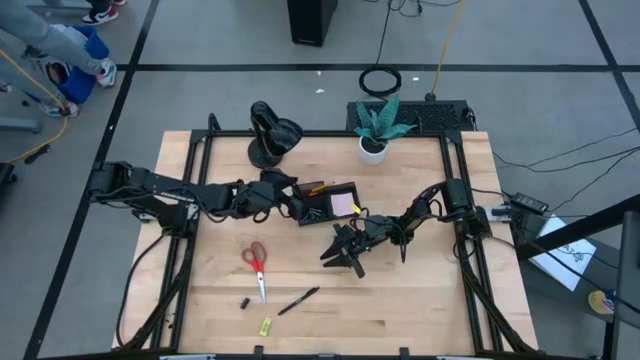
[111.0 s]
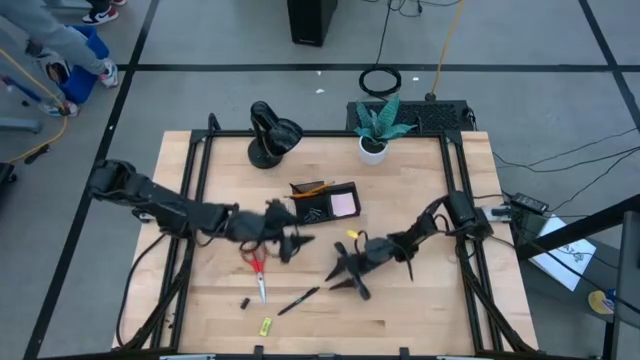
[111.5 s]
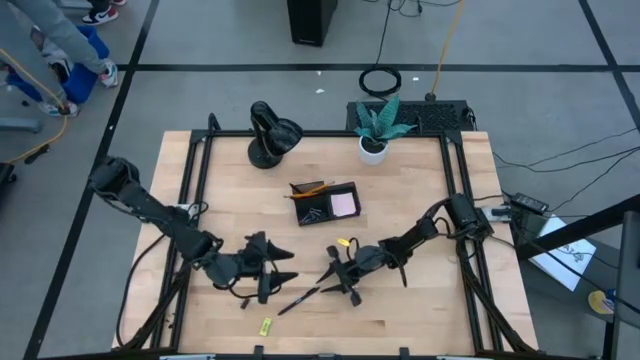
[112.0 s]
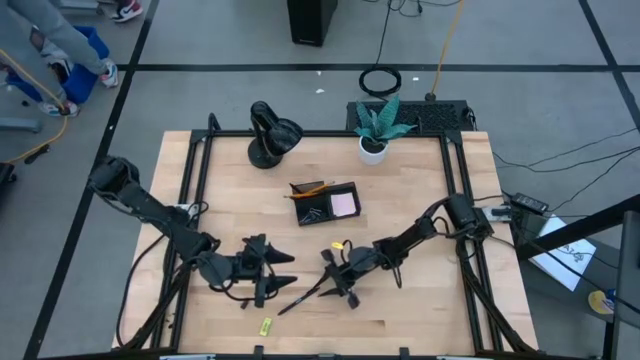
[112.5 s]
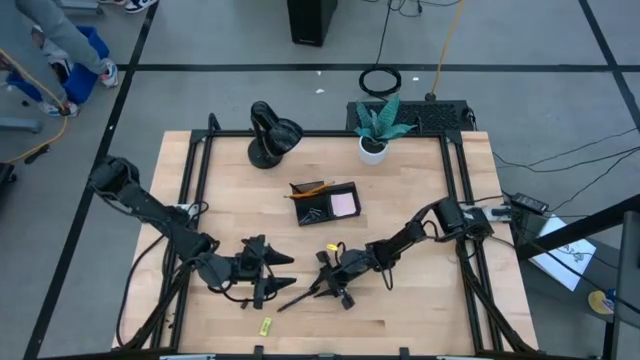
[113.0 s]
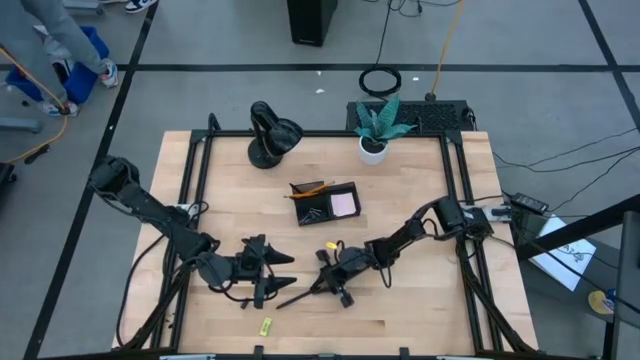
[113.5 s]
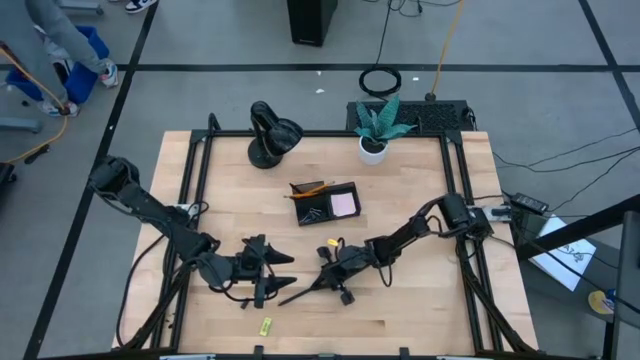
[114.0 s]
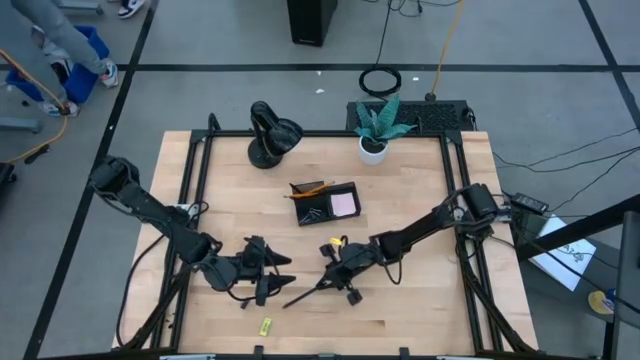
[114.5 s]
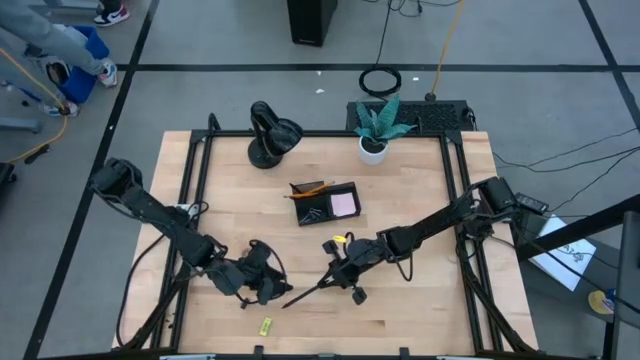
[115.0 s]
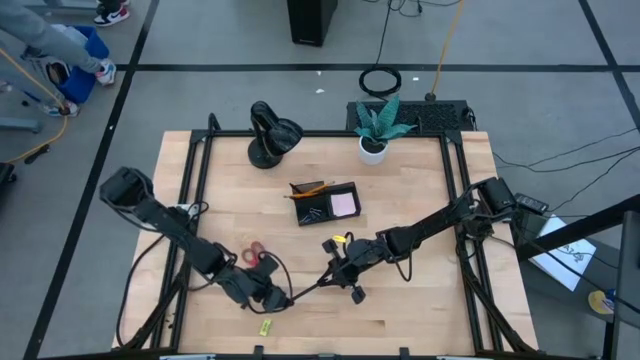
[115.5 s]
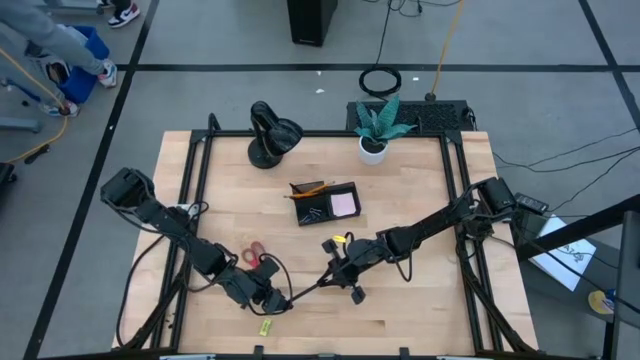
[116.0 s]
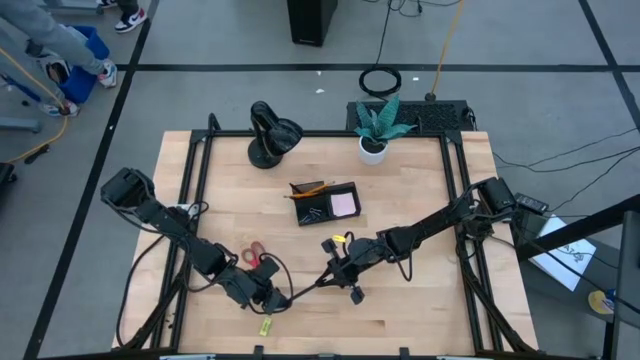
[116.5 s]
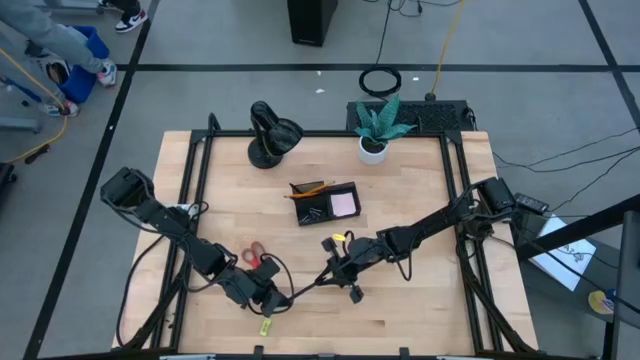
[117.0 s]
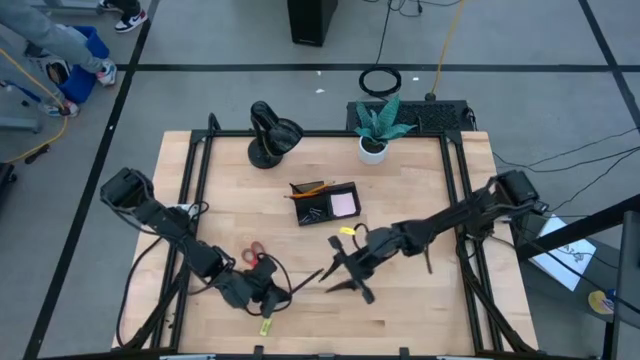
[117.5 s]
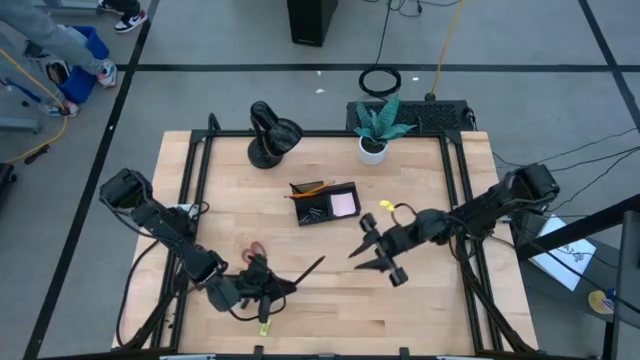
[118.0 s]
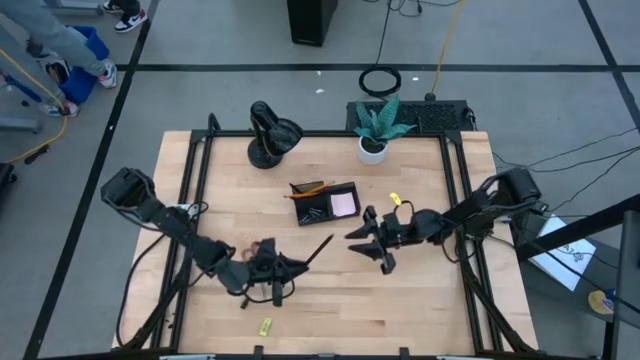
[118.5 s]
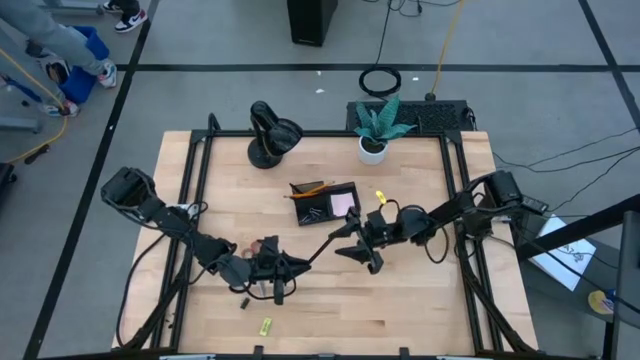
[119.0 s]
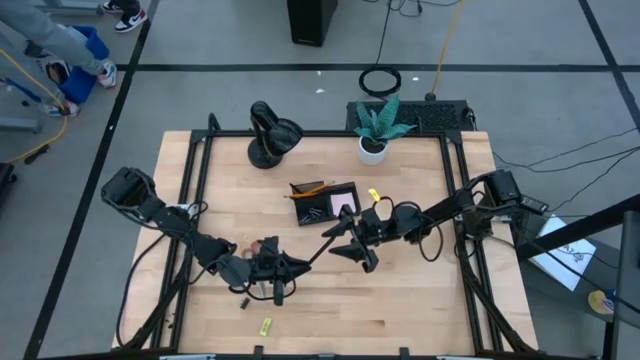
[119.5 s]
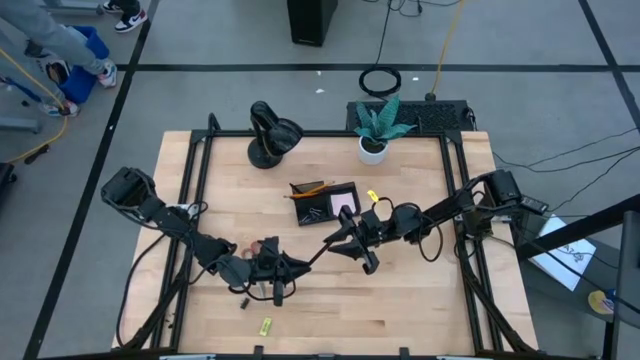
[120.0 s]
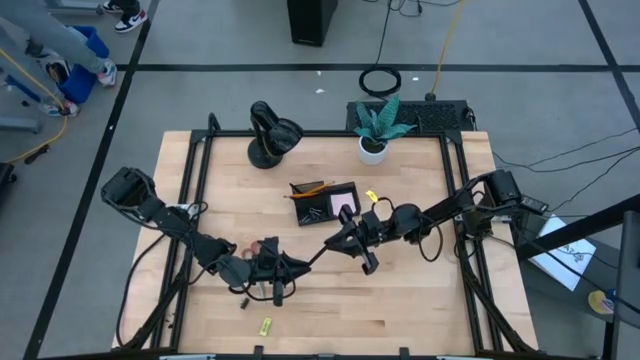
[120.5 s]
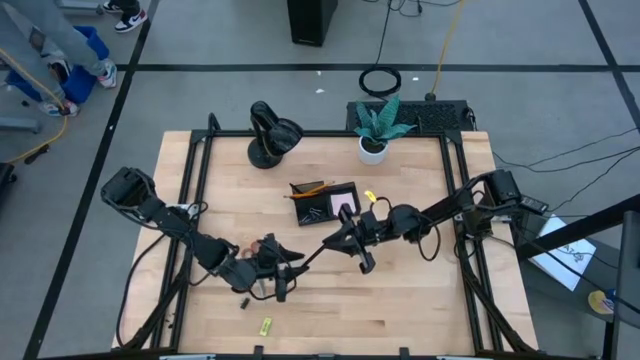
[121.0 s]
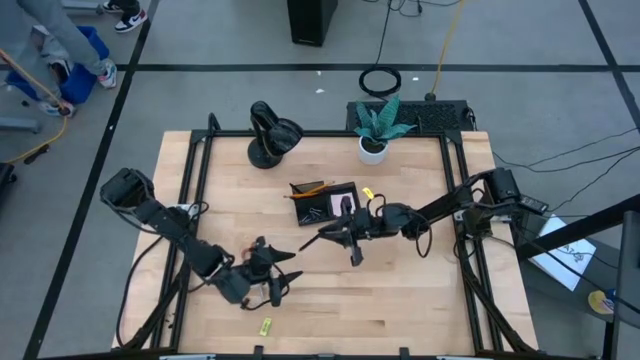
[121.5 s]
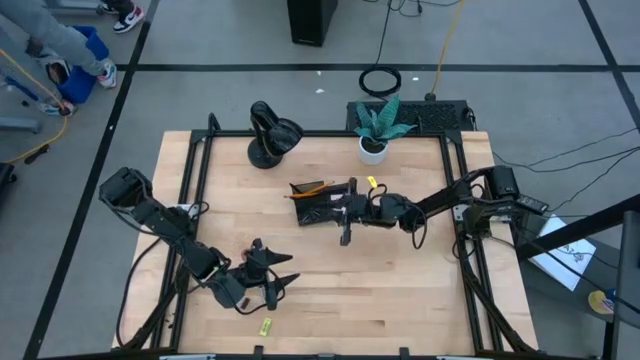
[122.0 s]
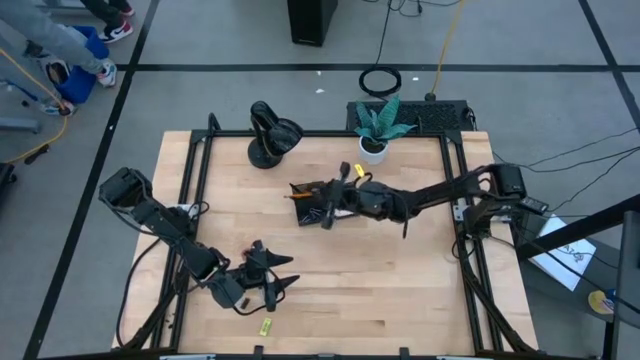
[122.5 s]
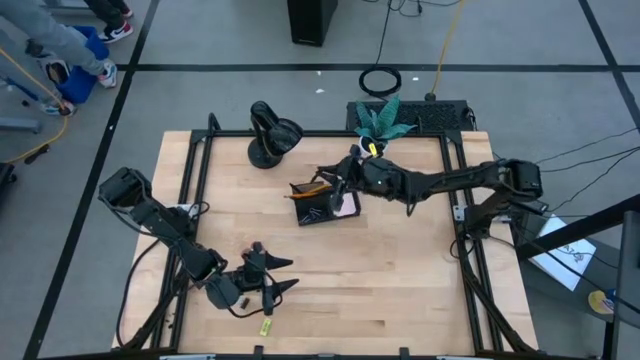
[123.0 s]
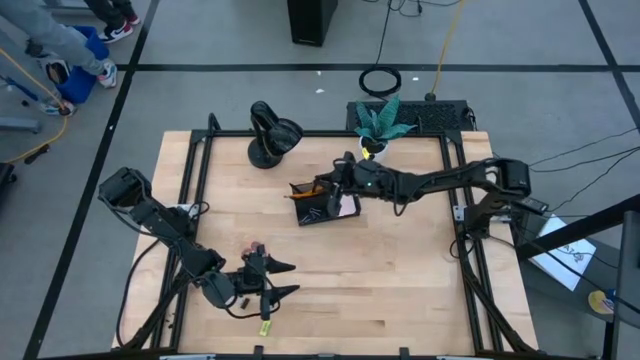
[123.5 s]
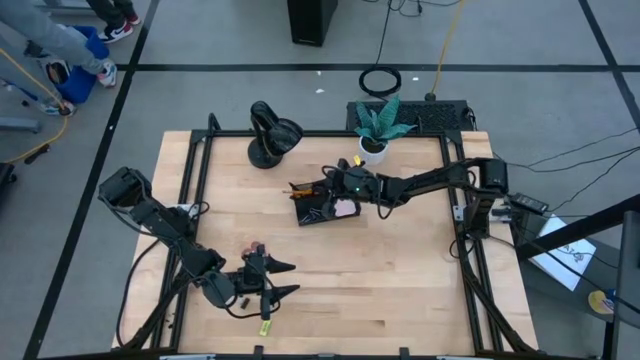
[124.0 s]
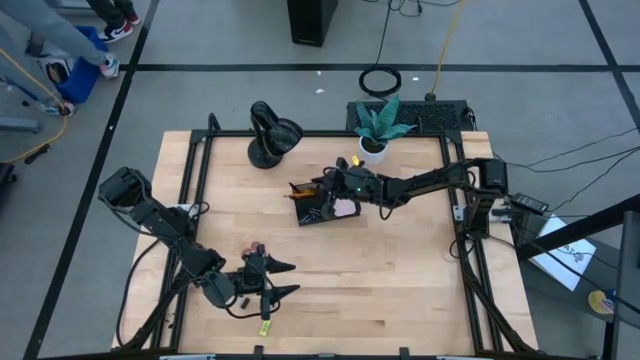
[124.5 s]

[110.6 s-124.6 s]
Task: Pick and place office supplies into organizer
Put the black pen into the desk organizer

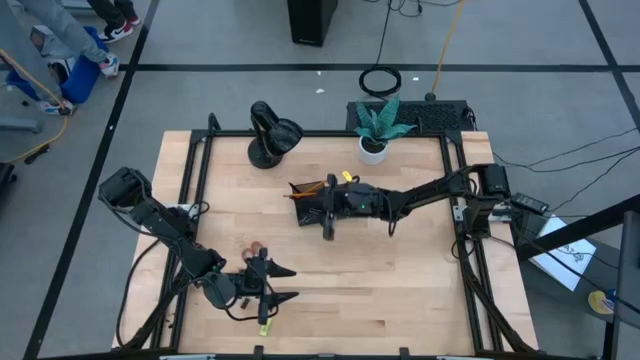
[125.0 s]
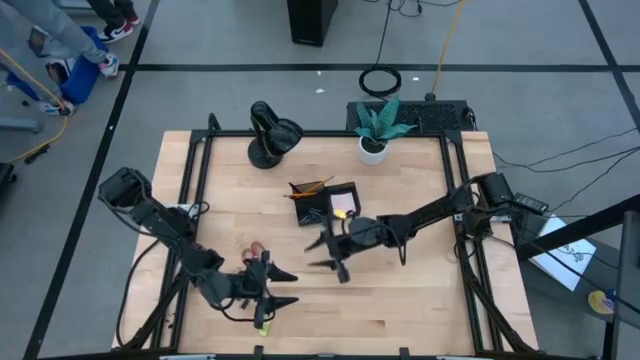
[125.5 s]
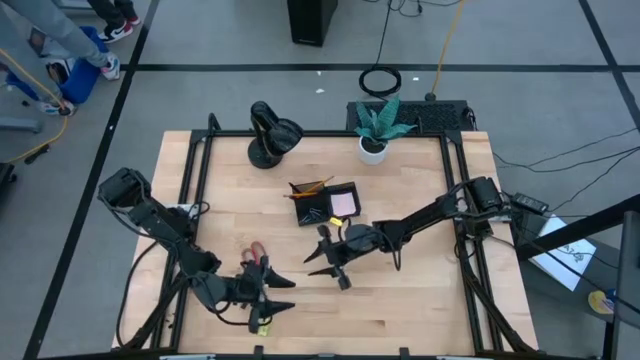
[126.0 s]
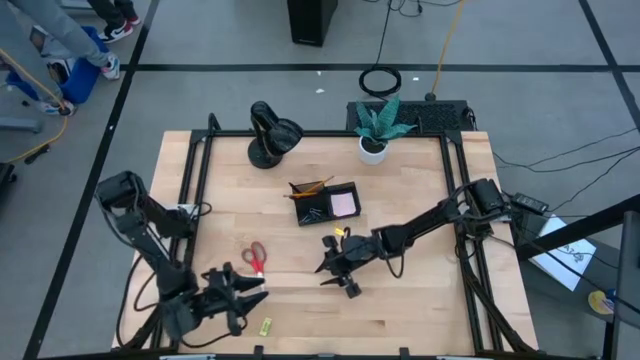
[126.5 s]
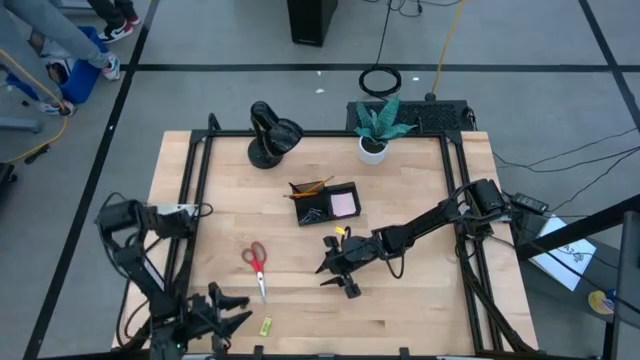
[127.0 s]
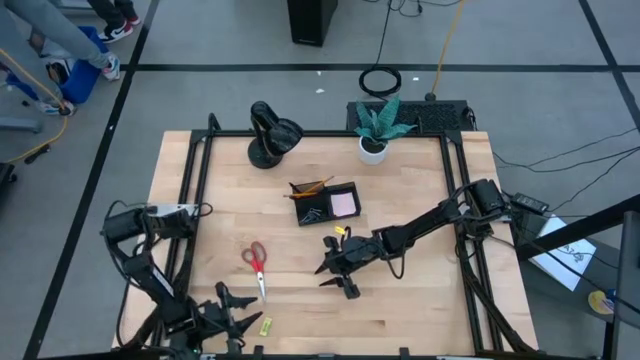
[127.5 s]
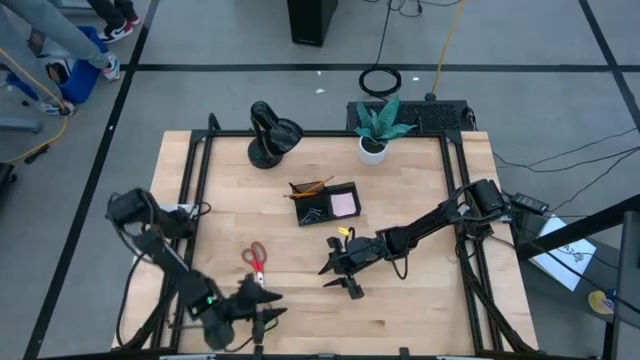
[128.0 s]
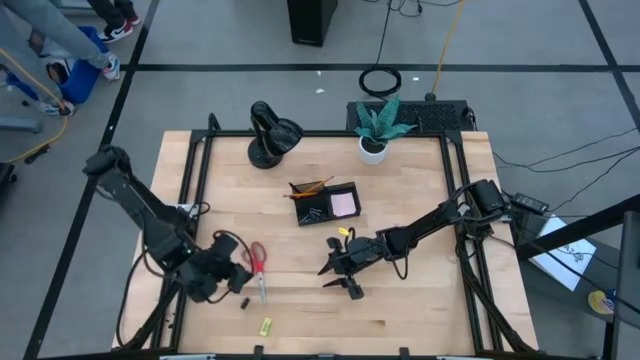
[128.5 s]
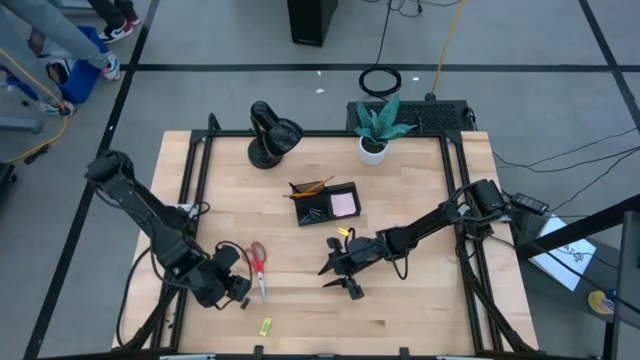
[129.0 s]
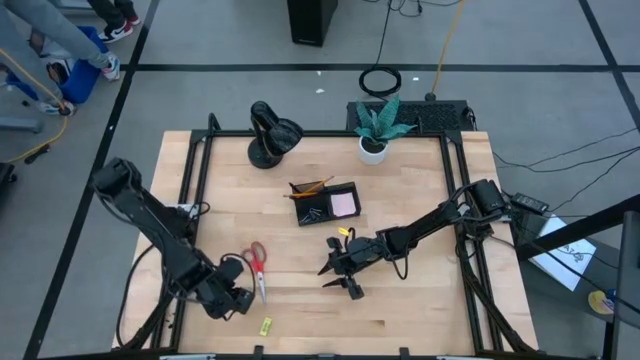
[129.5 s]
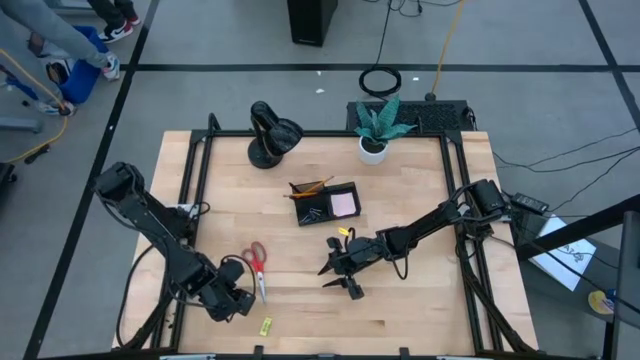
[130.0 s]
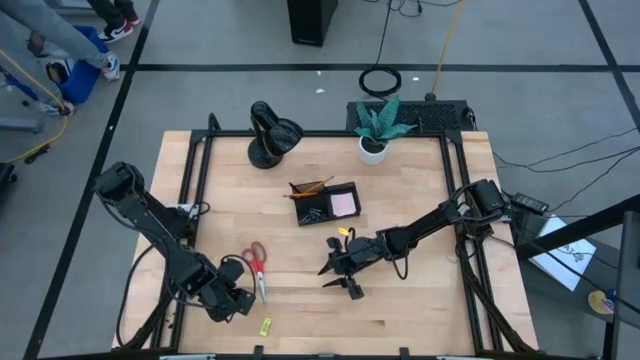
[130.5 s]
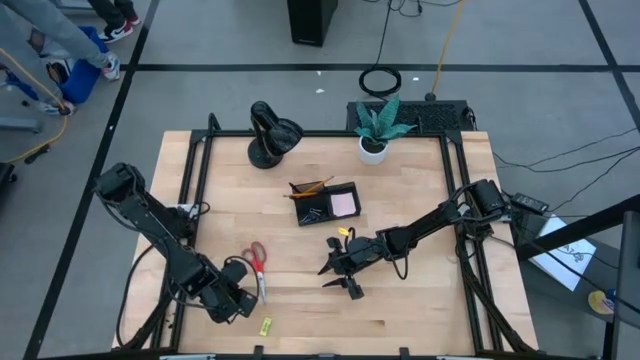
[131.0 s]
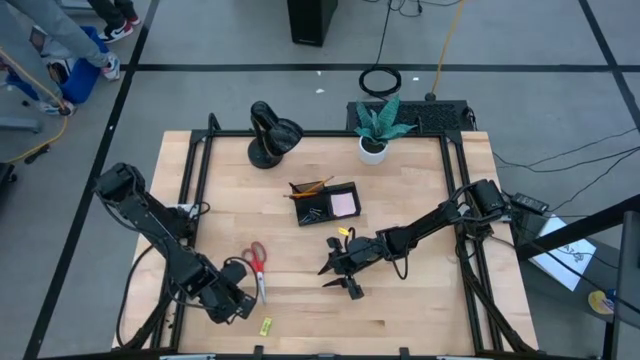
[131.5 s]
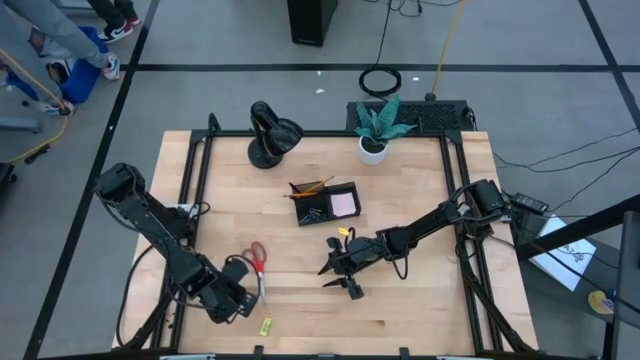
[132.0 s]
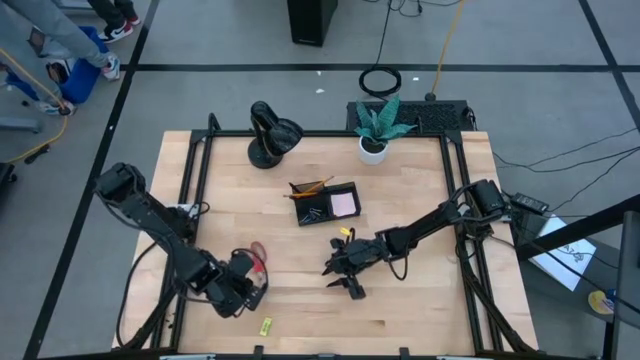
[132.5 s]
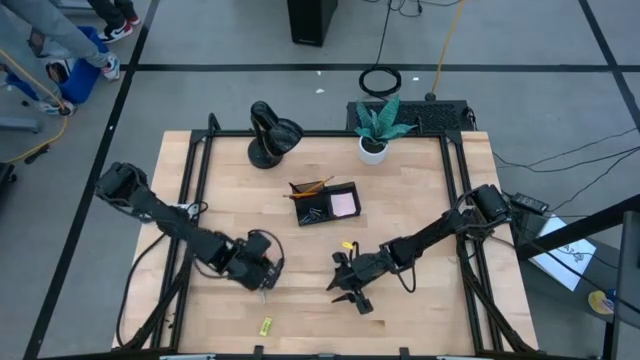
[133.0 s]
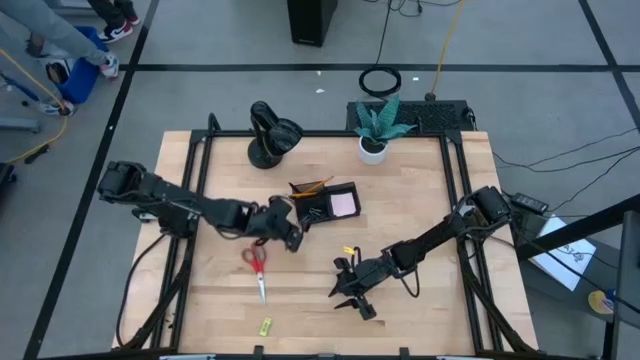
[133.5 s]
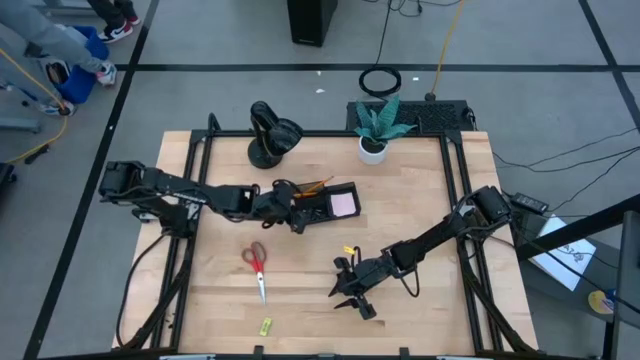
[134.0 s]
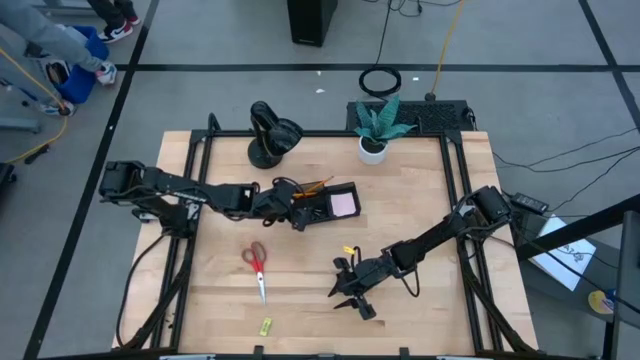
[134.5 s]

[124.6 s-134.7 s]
Put the black binder clip into the desk organizer
